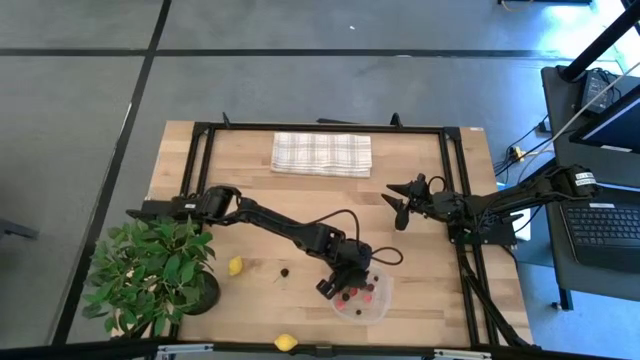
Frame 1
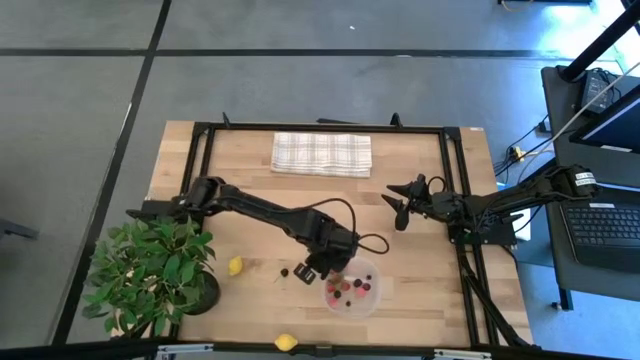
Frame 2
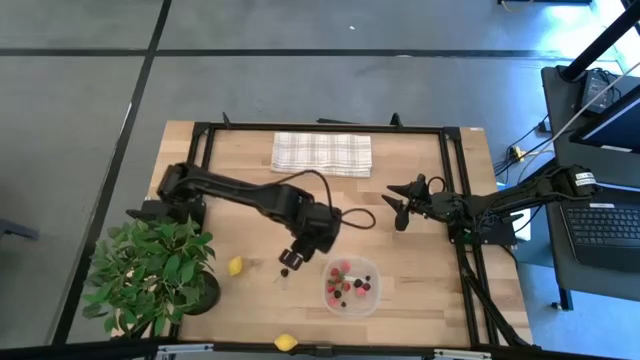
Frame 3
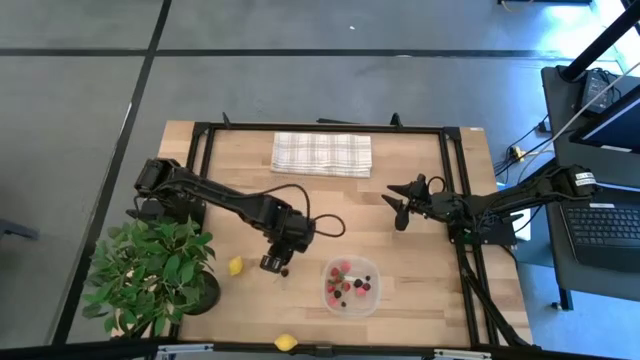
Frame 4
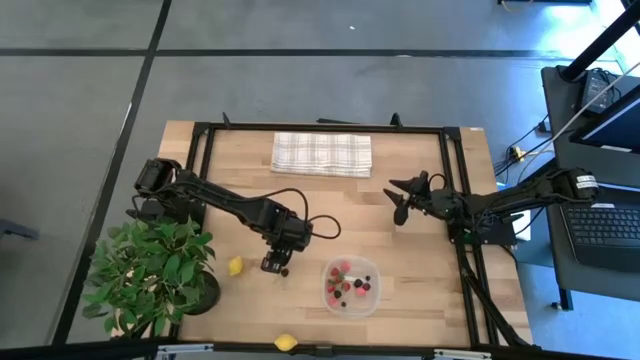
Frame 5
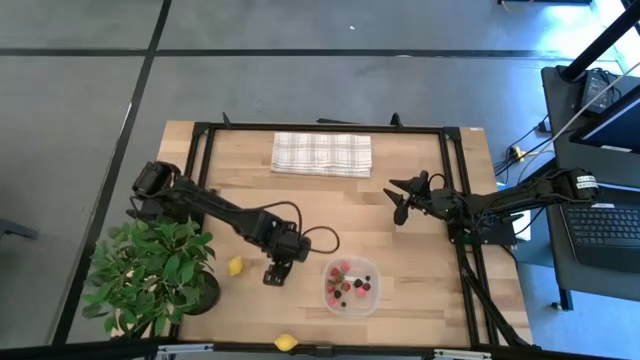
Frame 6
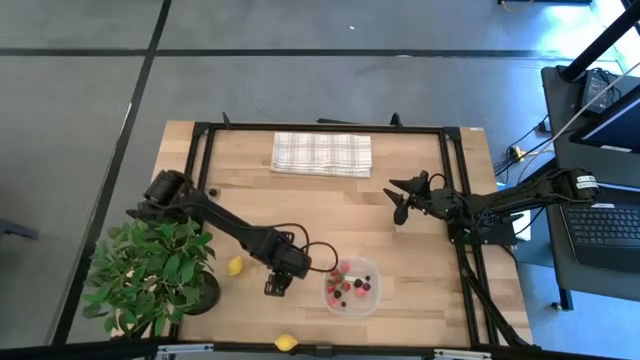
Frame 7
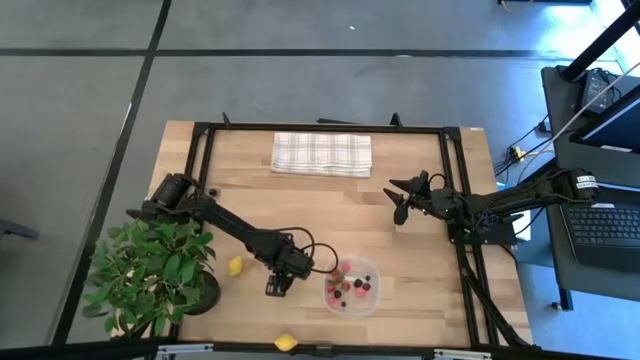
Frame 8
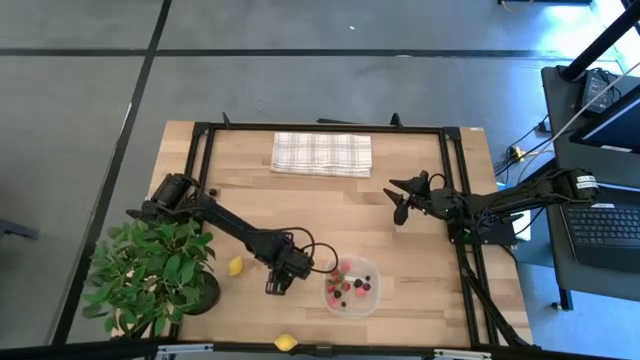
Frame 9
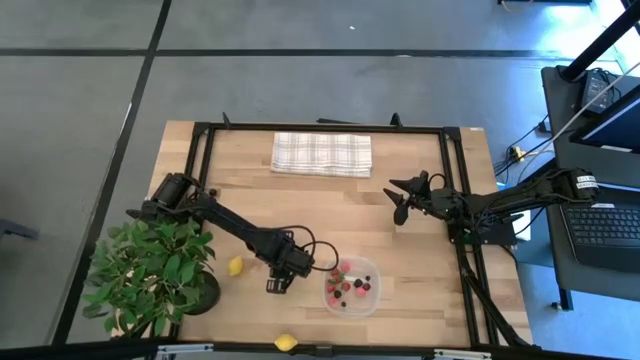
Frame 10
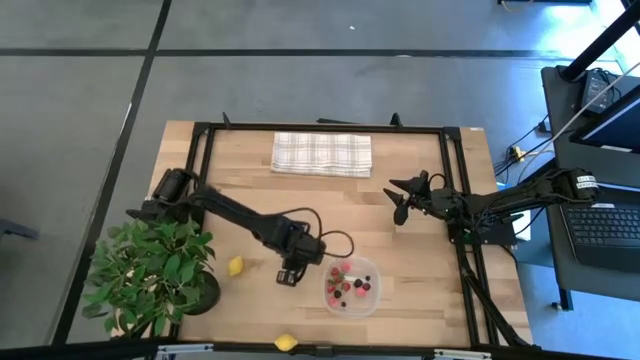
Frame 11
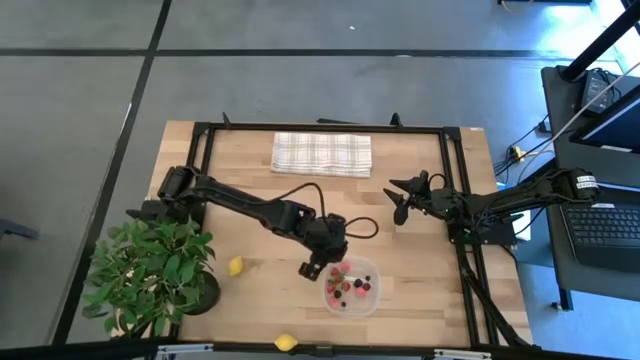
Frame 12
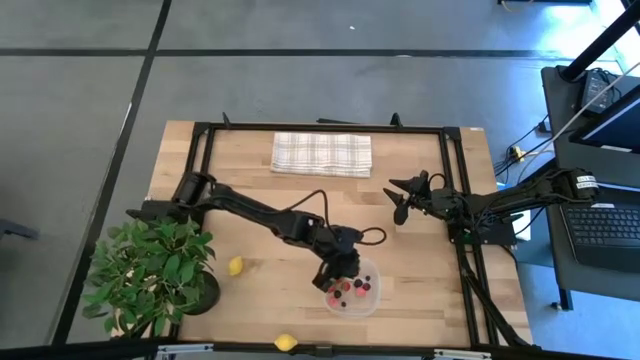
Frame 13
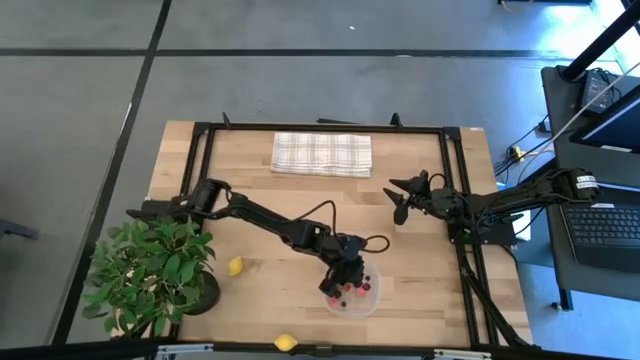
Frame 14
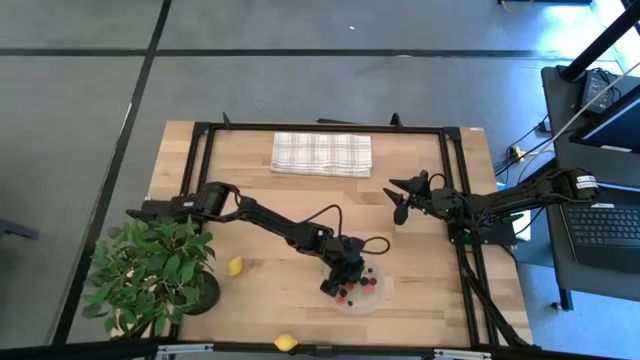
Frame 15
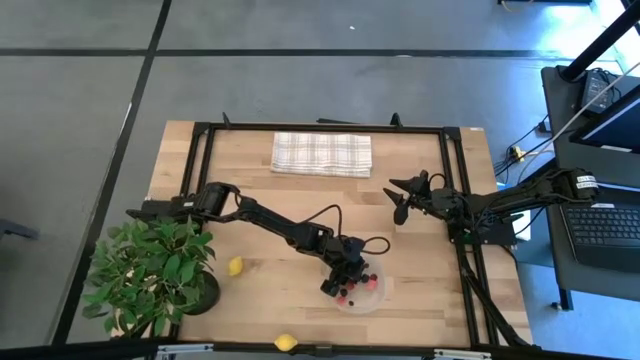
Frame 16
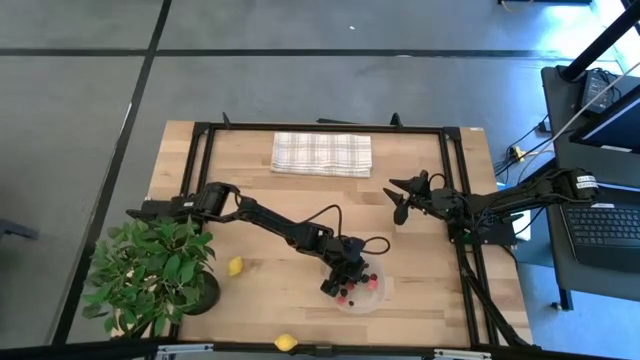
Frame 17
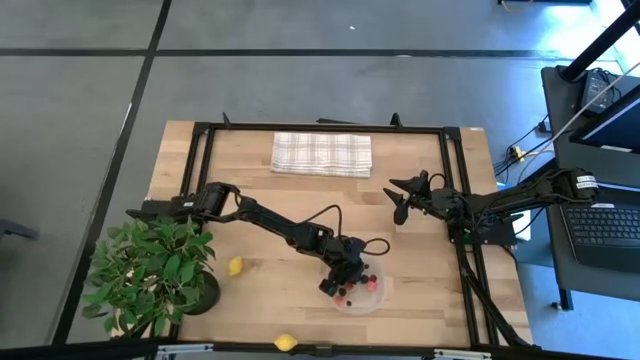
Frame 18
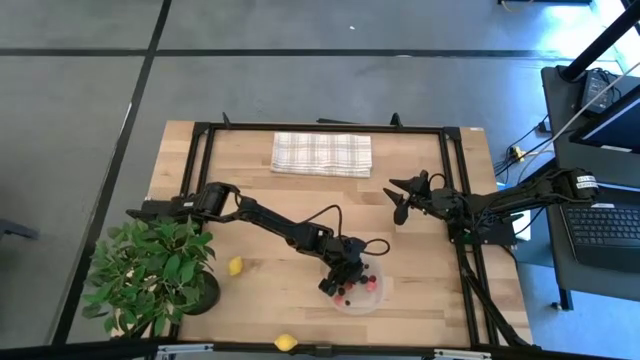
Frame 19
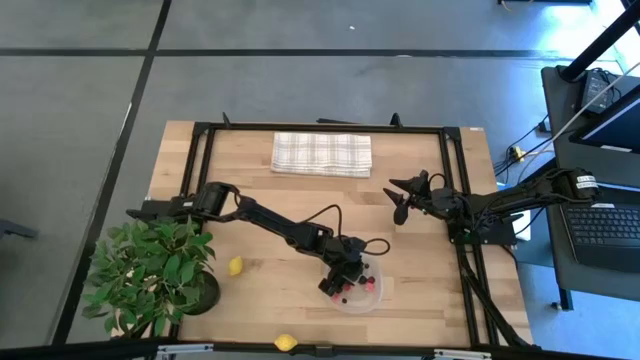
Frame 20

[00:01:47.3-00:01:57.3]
Task: Pick and placing Produce into tupperware
Put the bottom dark purple cherry into the transparent bin

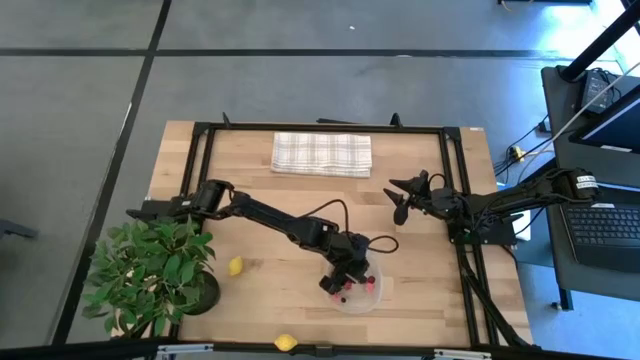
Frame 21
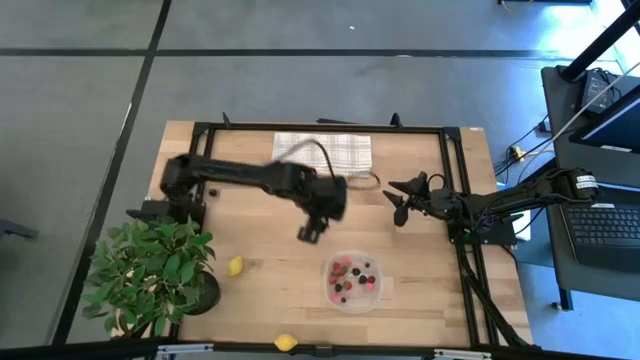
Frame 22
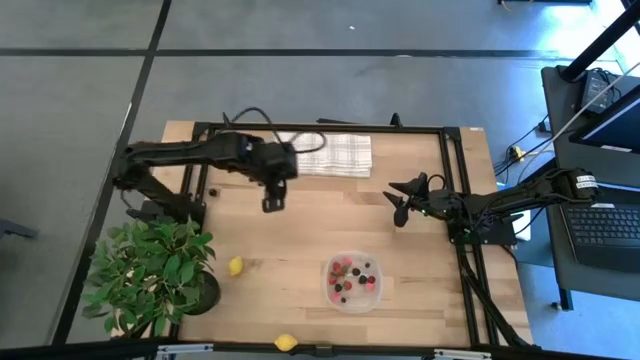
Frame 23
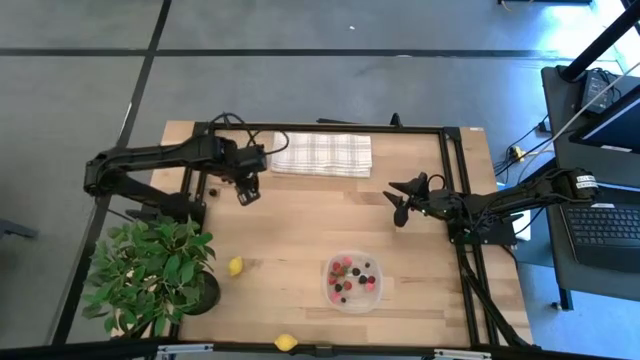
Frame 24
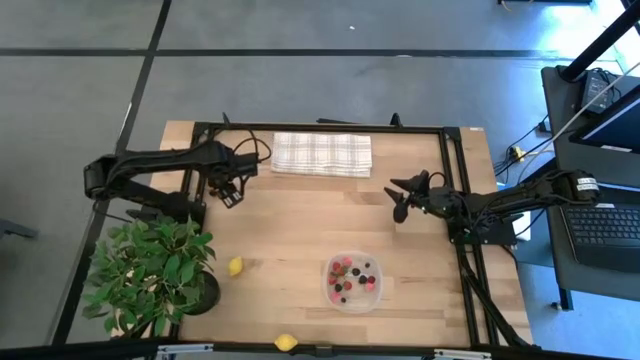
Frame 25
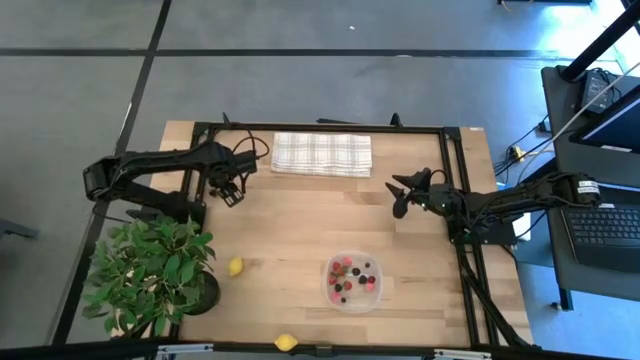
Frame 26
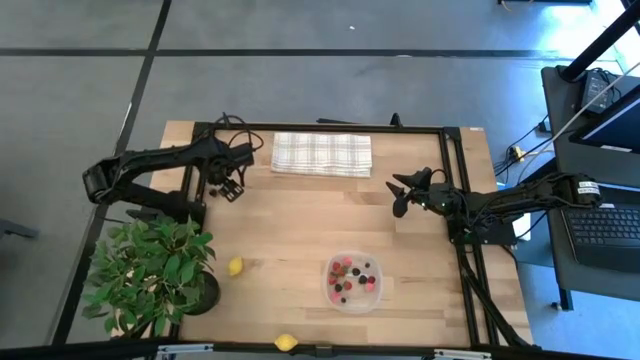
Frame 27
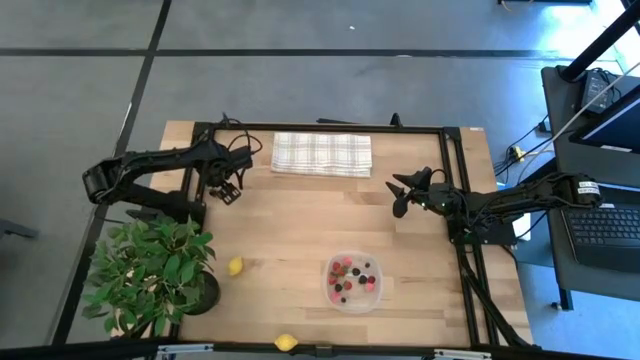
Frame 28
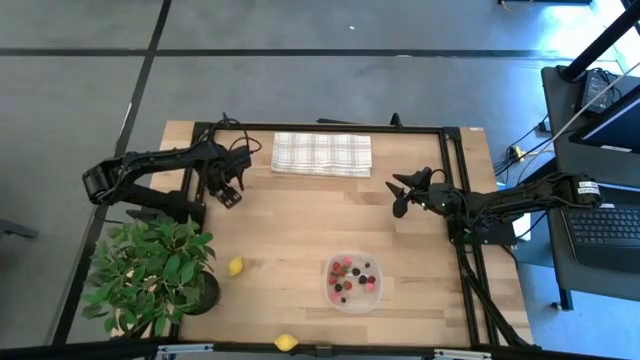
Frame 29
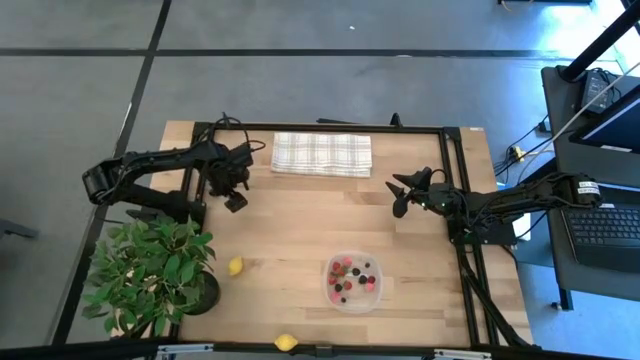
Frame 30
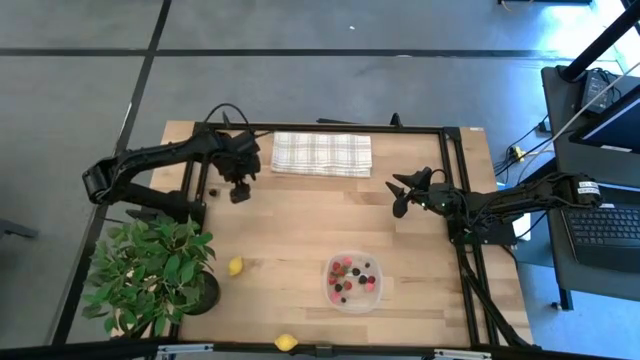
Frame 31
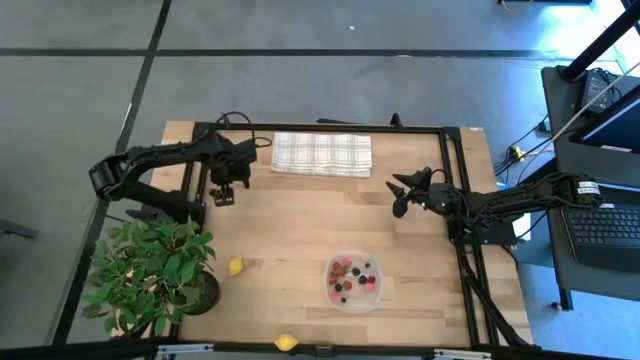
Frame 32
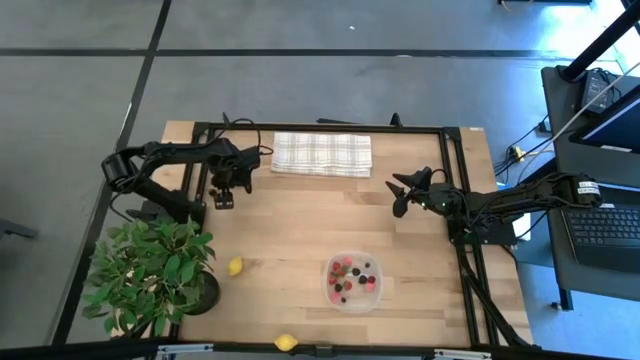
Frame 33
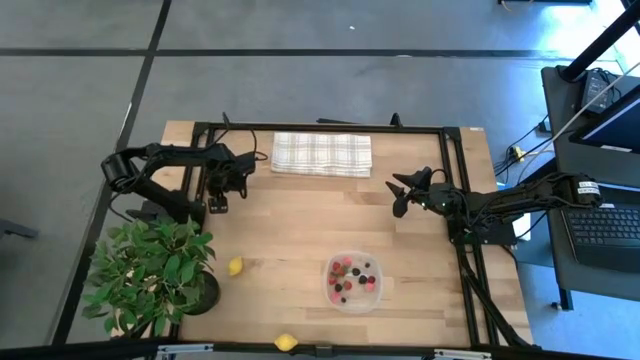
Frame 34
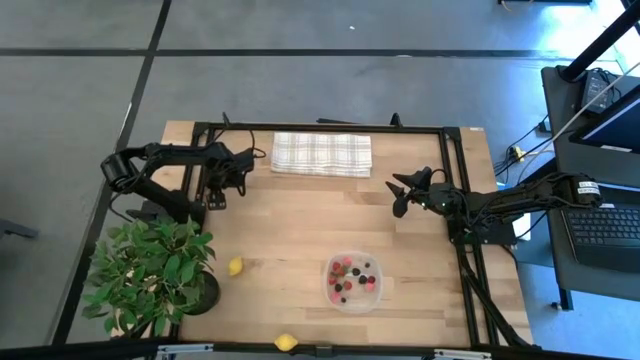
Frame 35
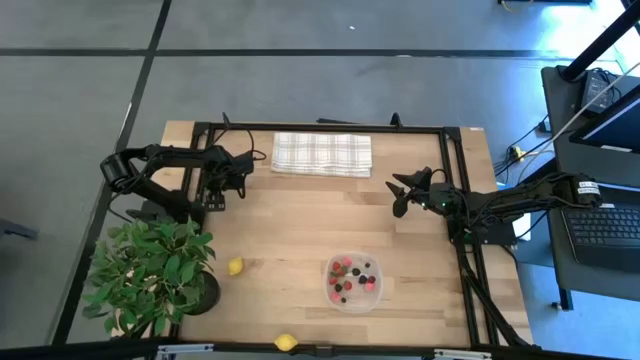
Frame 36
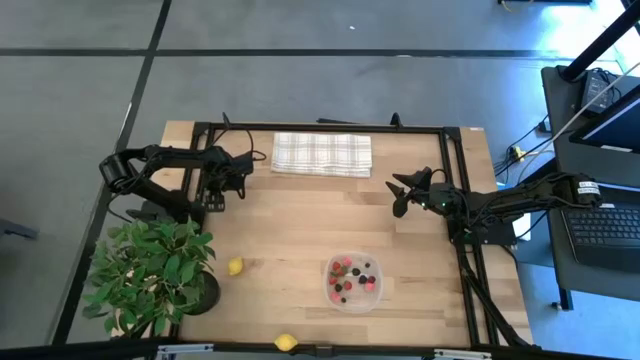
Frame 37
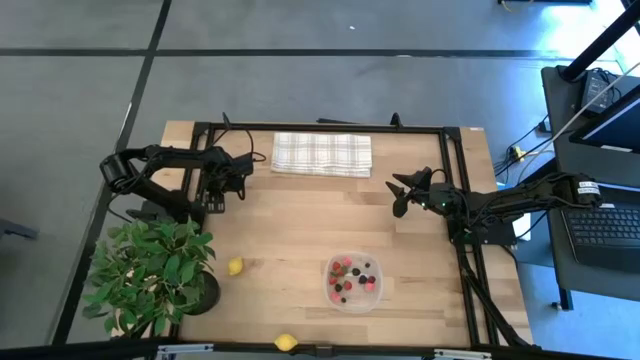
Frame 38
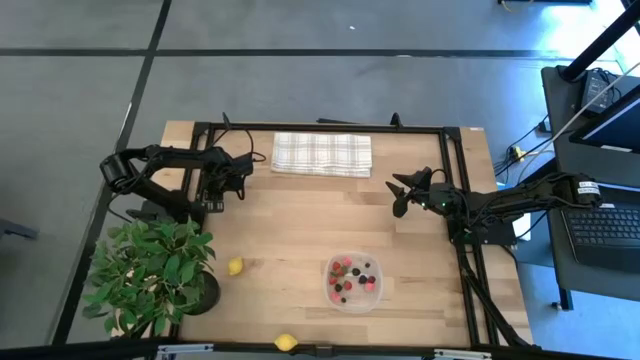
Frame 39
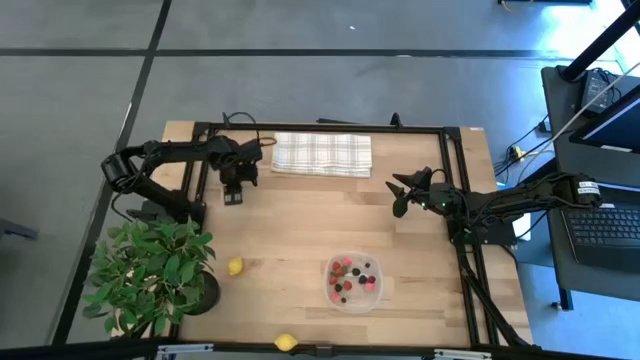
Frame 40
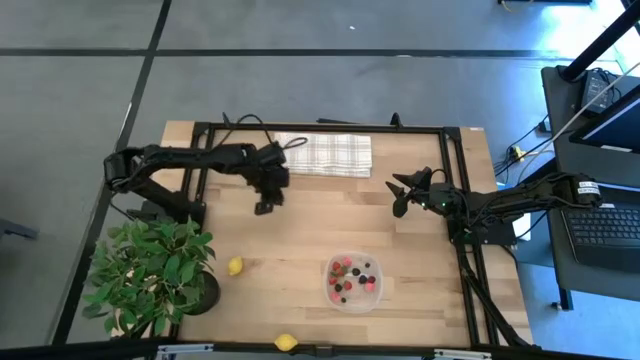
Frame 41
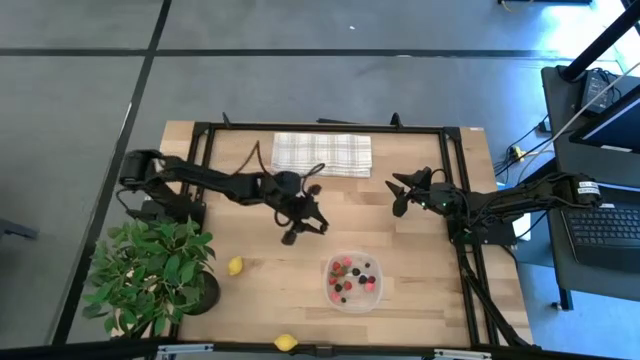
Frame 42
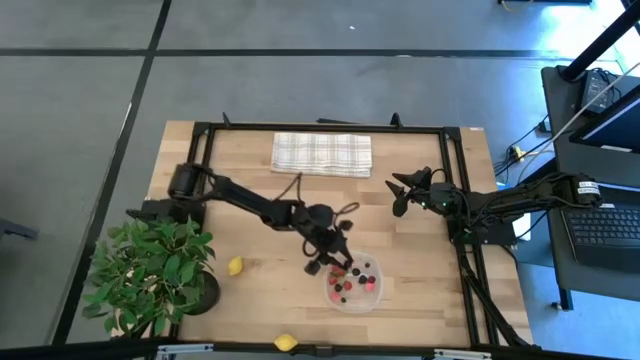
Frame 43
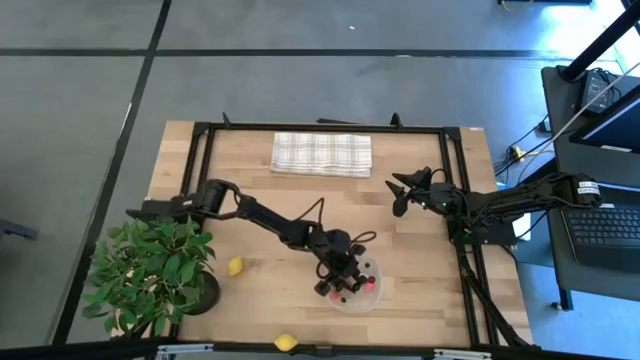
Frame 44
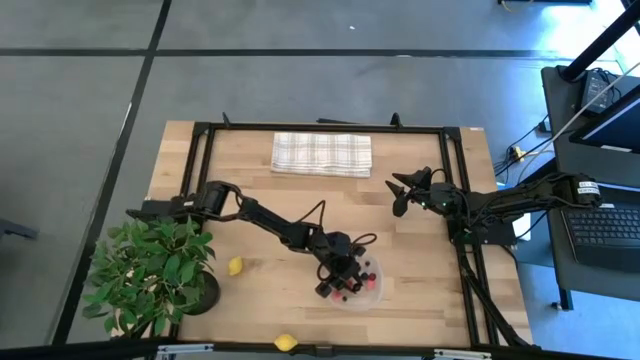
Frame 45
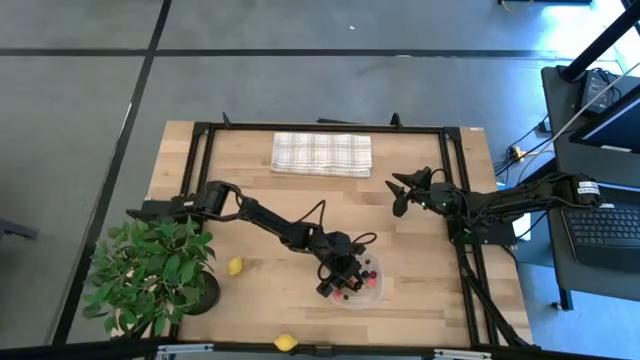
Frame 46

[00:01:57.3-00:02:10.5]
Put the dark purple cherry into the transparent bin
